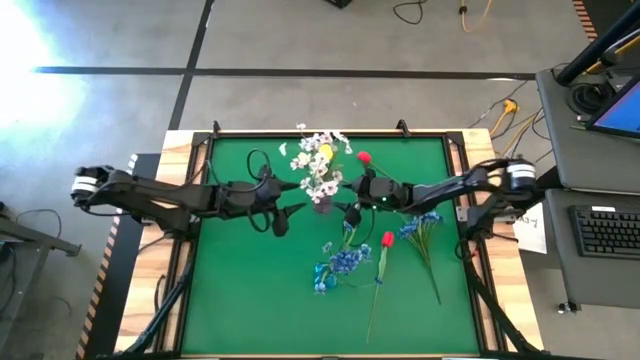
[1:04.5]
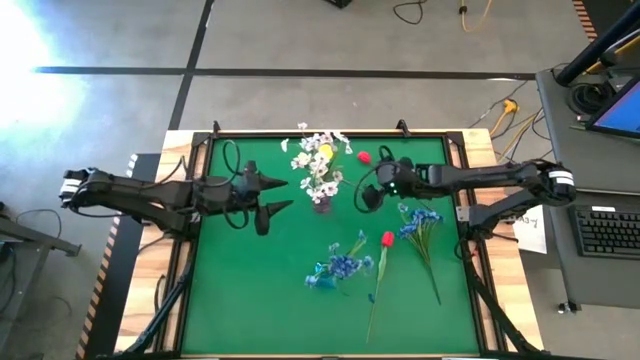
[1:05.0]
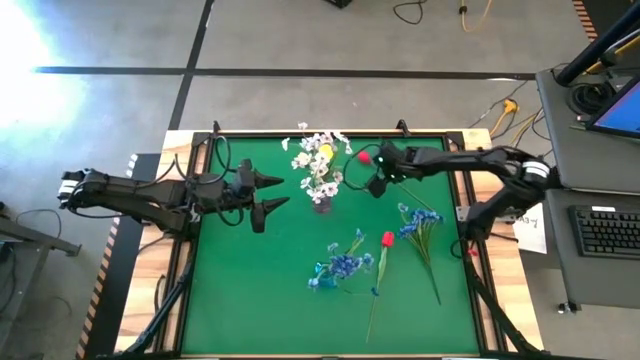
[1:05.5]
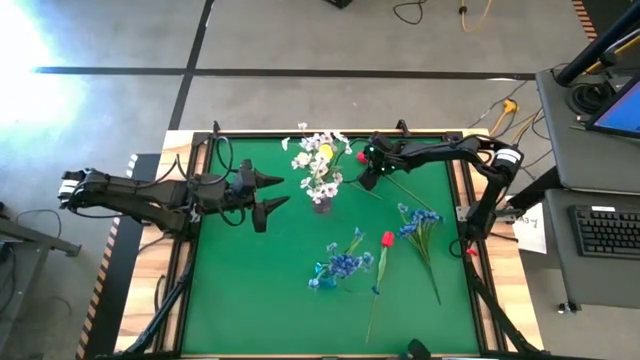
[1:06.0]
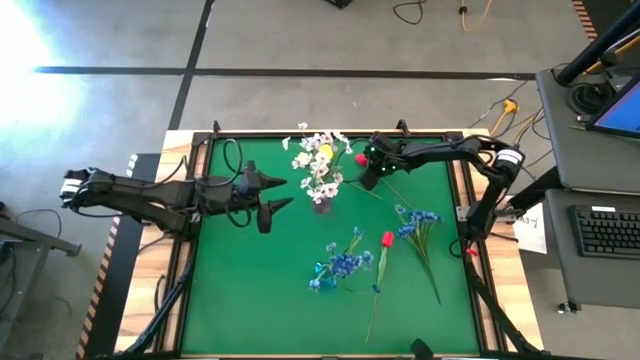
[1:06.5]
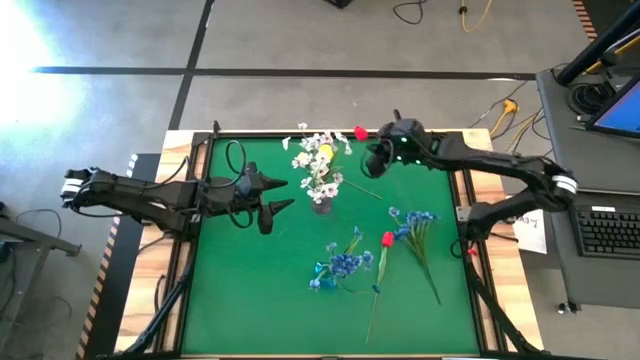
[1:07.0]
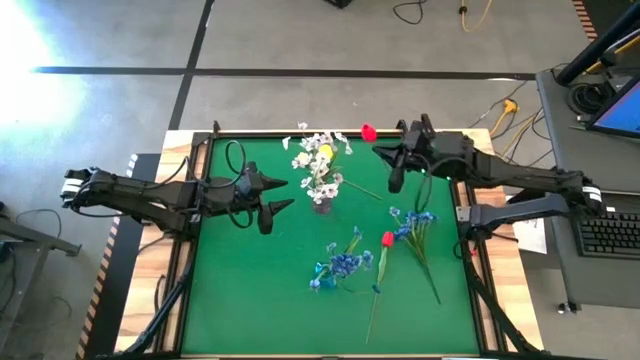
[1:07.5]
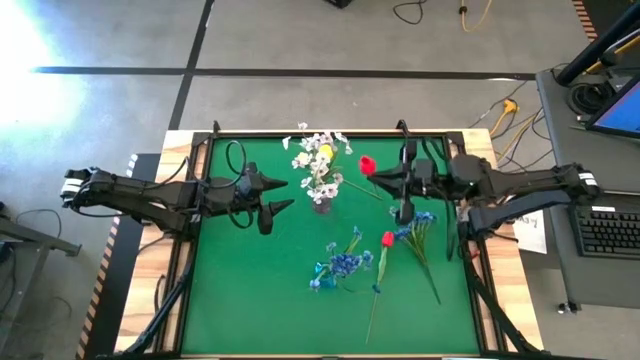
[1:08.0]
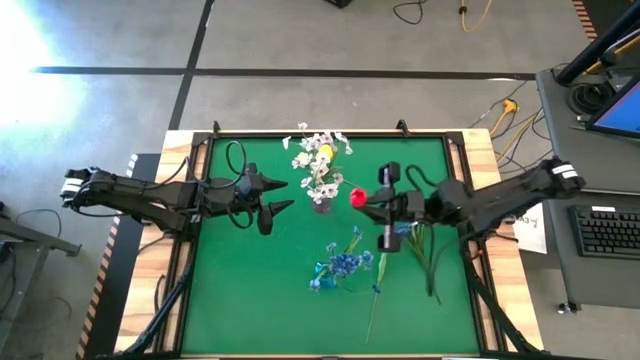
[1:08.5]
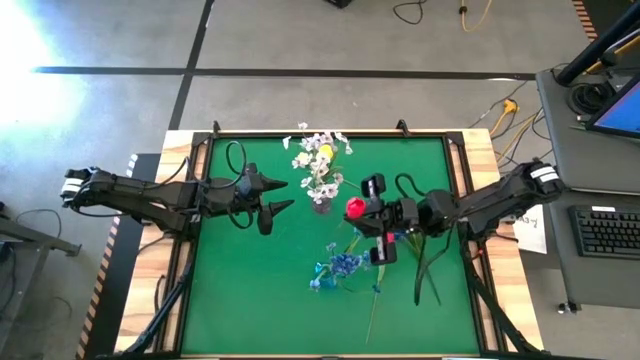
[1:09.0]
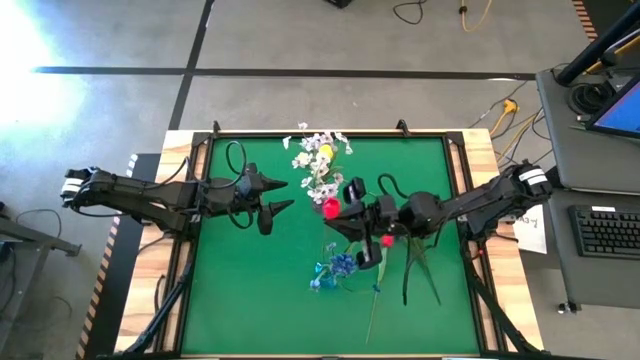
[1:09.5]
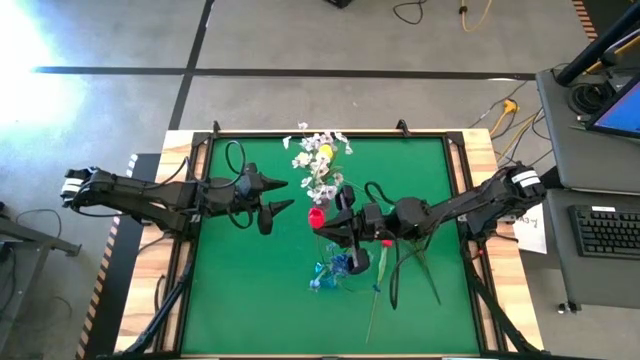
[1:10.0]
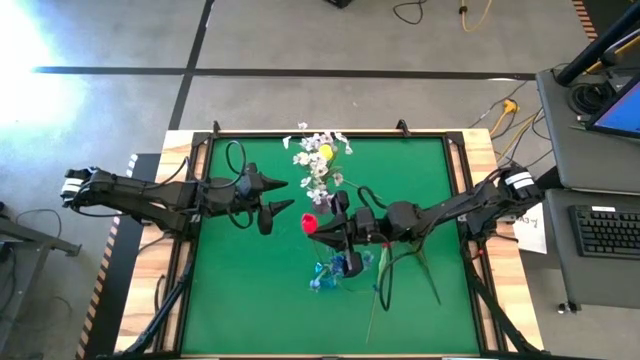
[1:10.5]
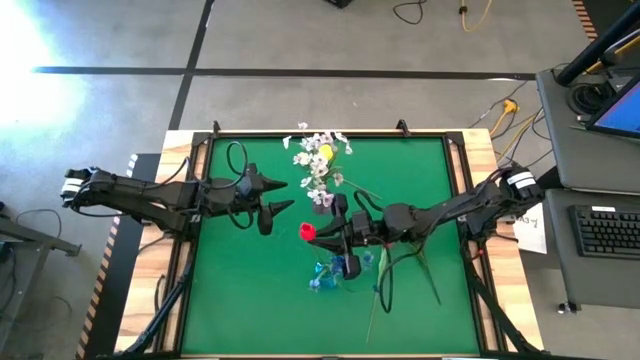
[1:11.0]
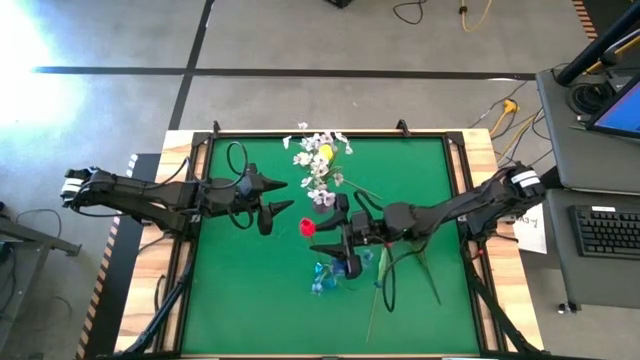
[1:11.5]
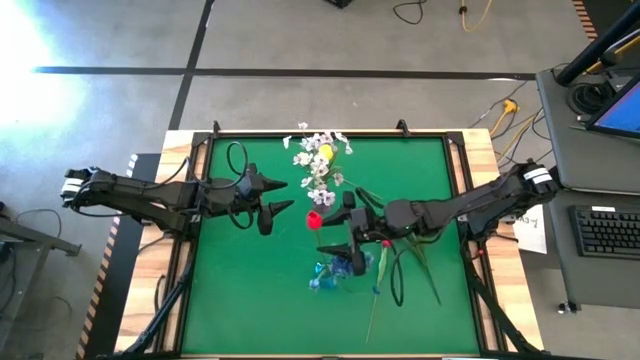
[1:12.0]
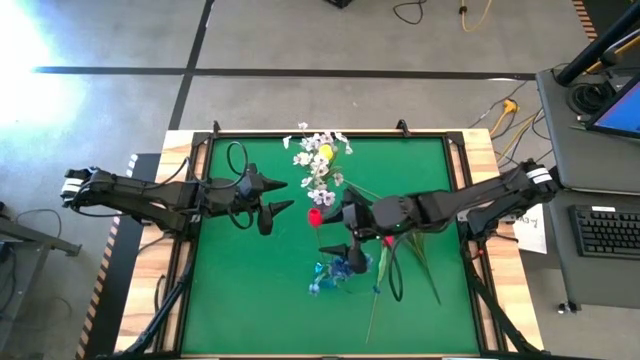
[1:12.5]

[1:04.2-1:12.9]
Task: Sort flowers into vase by color
Put the top red flower into the blue vase

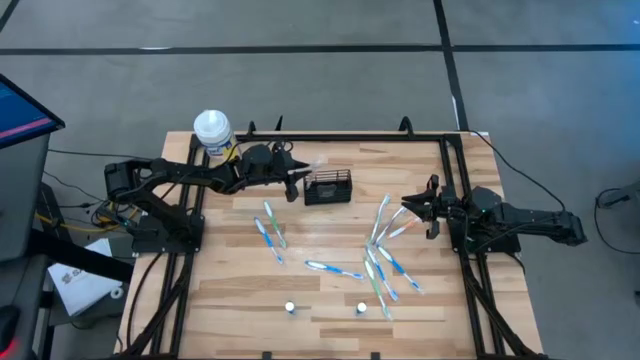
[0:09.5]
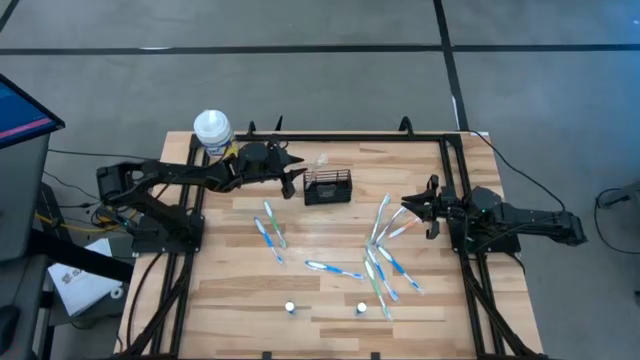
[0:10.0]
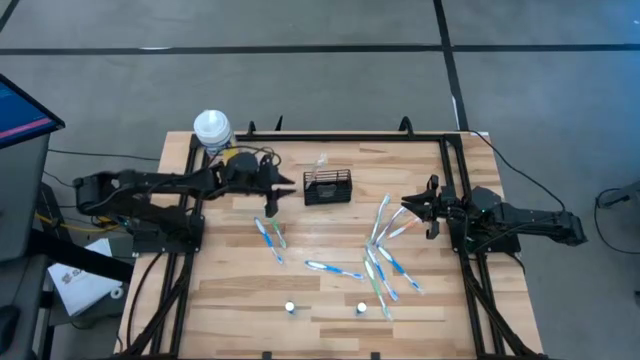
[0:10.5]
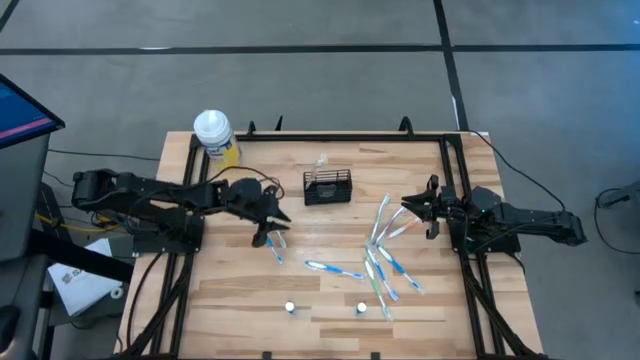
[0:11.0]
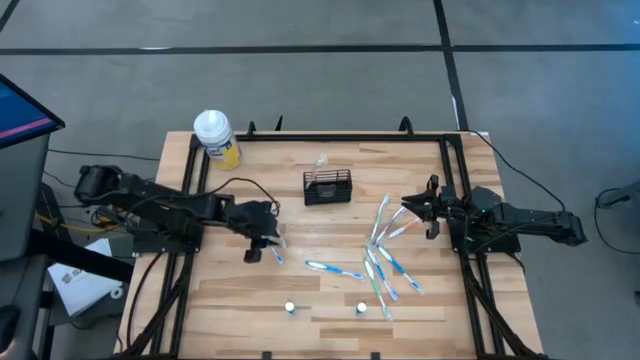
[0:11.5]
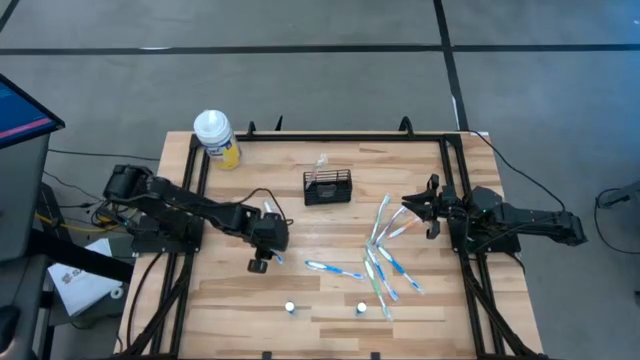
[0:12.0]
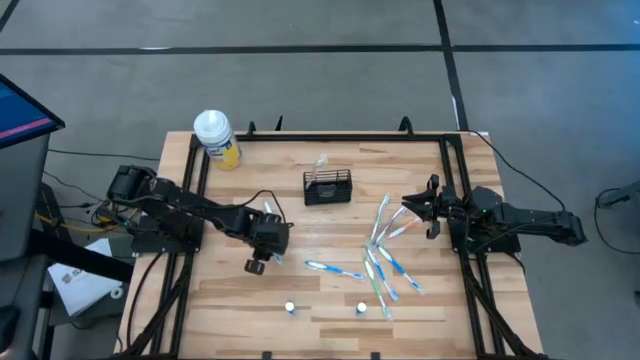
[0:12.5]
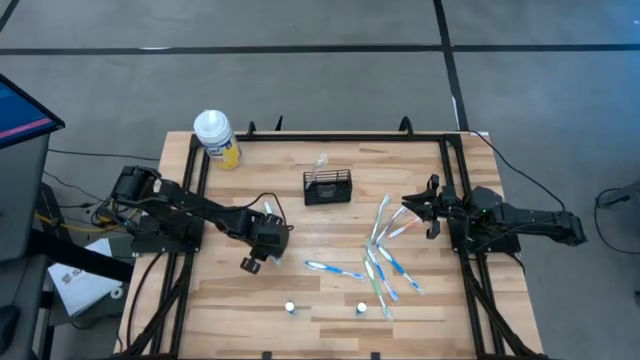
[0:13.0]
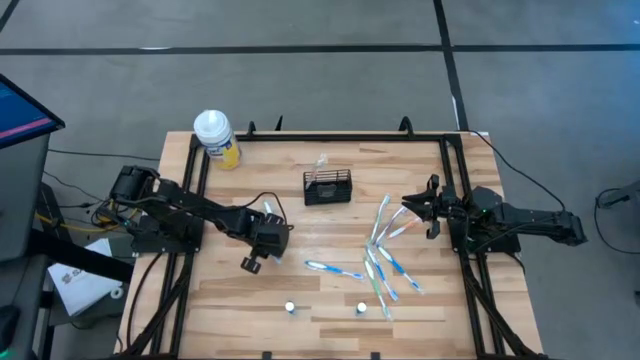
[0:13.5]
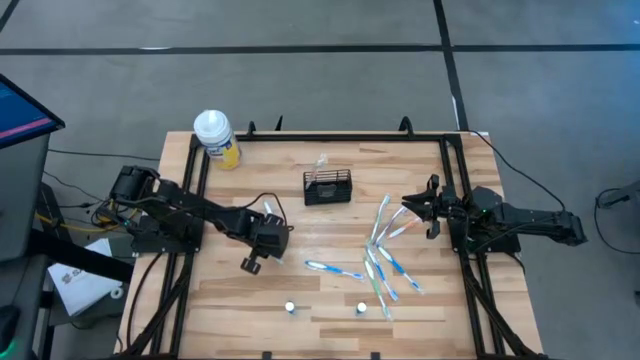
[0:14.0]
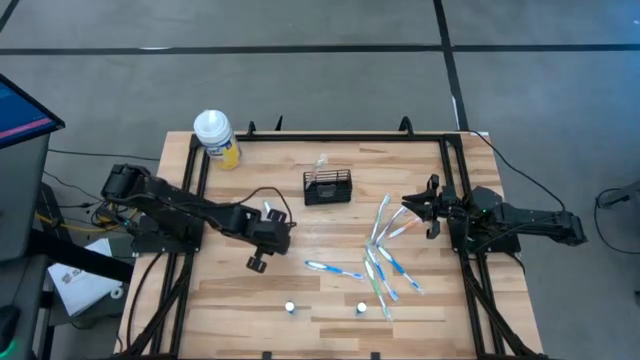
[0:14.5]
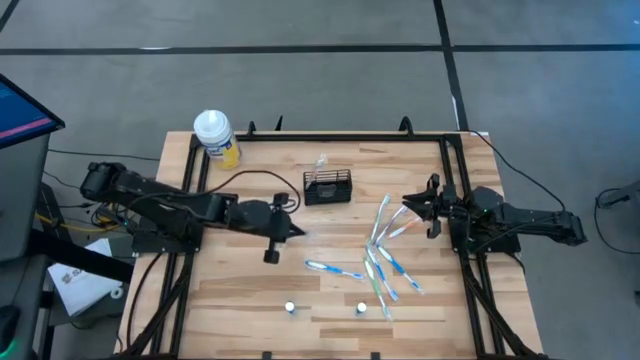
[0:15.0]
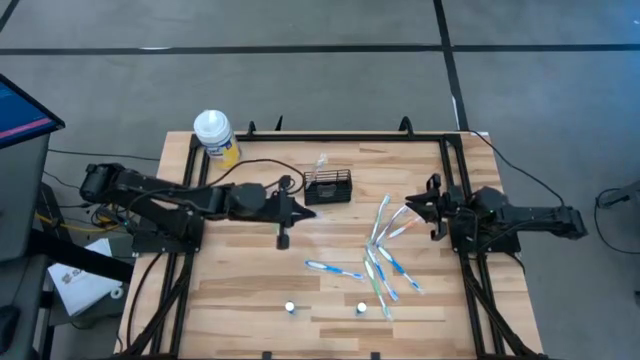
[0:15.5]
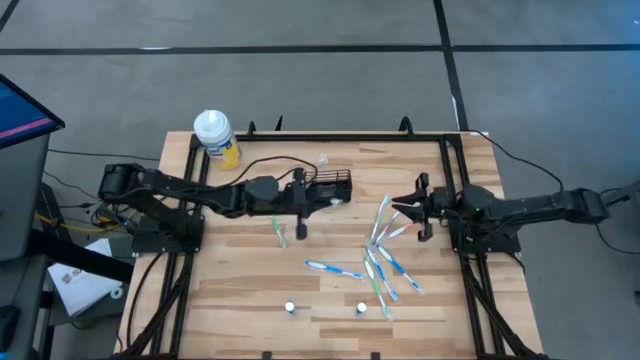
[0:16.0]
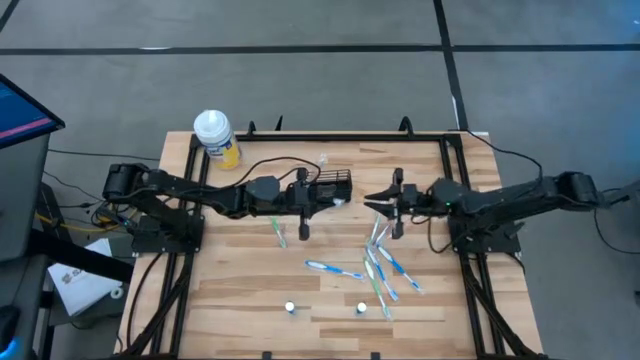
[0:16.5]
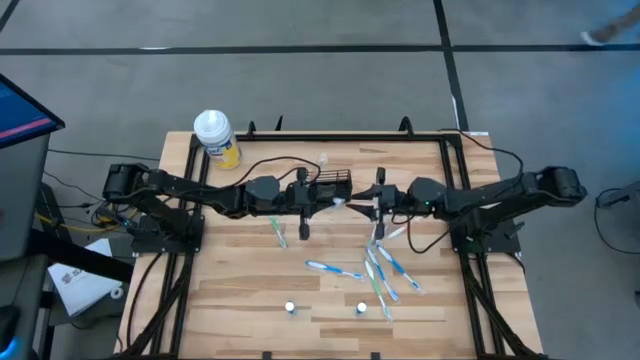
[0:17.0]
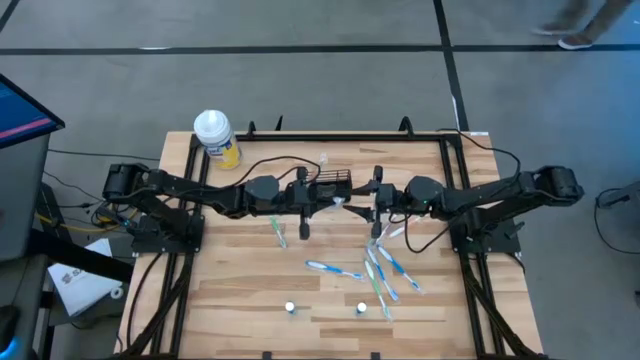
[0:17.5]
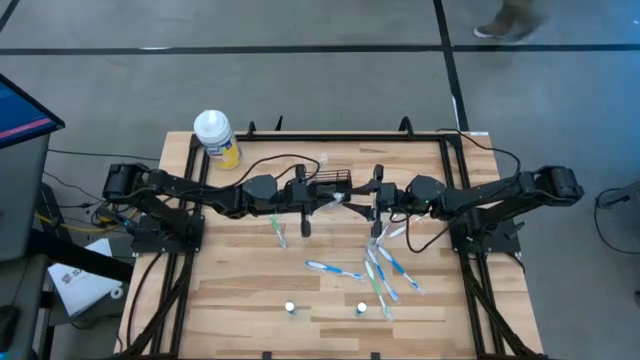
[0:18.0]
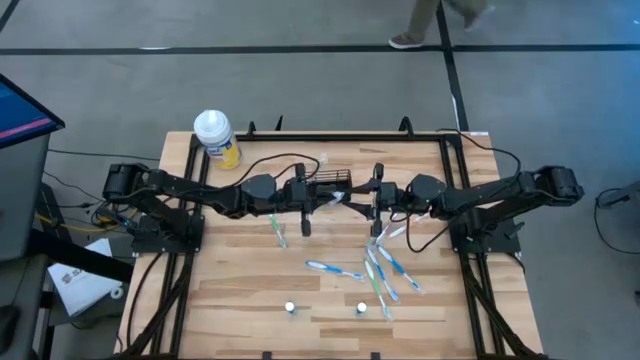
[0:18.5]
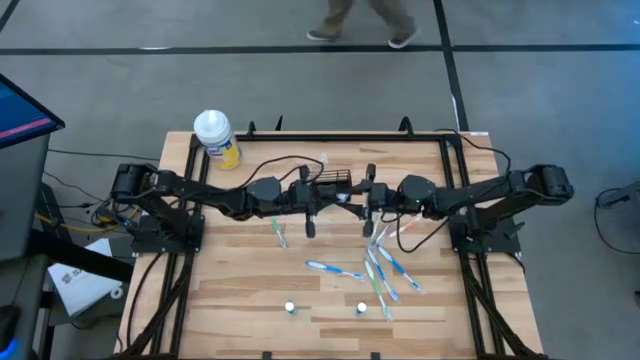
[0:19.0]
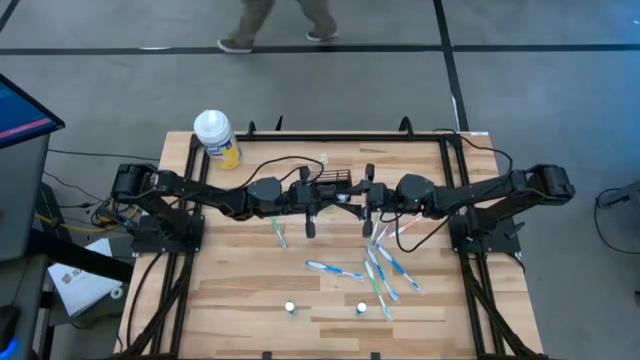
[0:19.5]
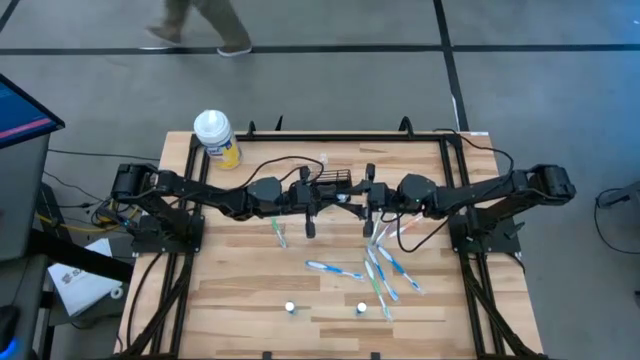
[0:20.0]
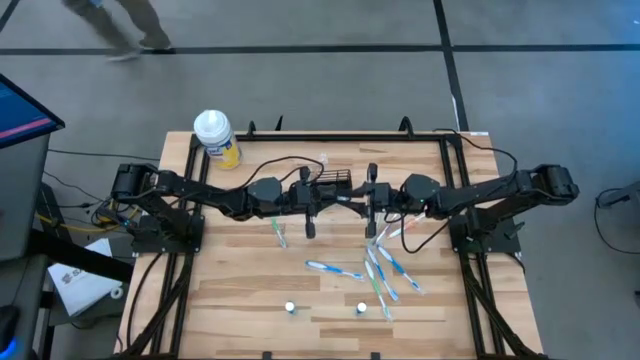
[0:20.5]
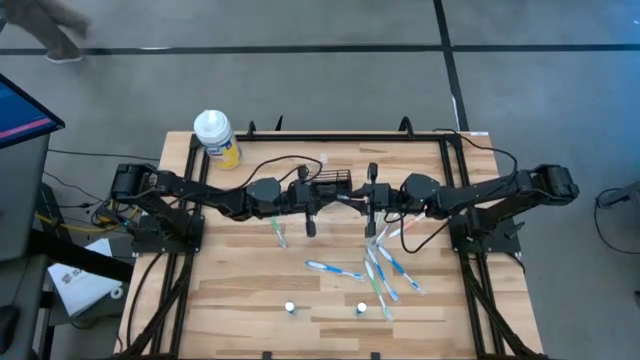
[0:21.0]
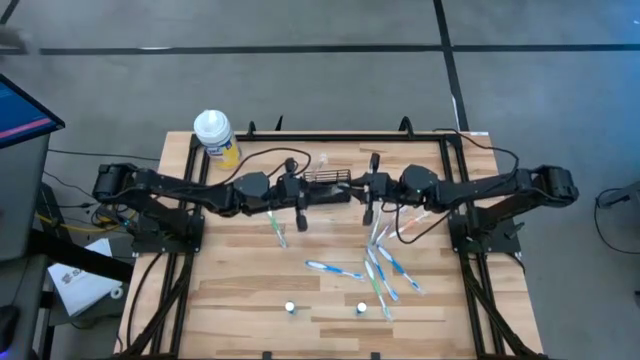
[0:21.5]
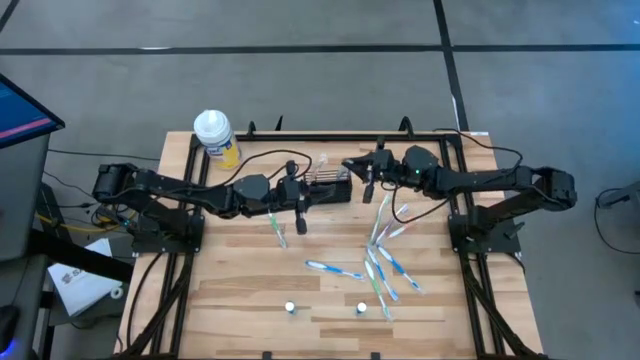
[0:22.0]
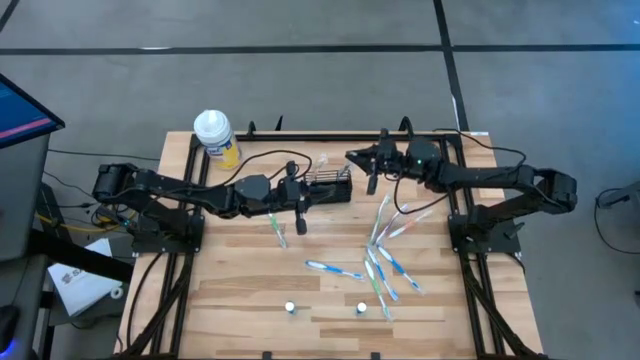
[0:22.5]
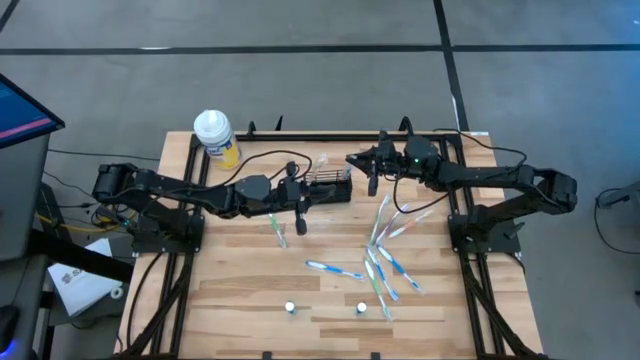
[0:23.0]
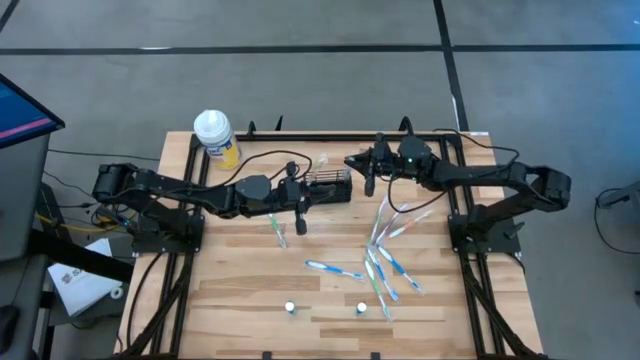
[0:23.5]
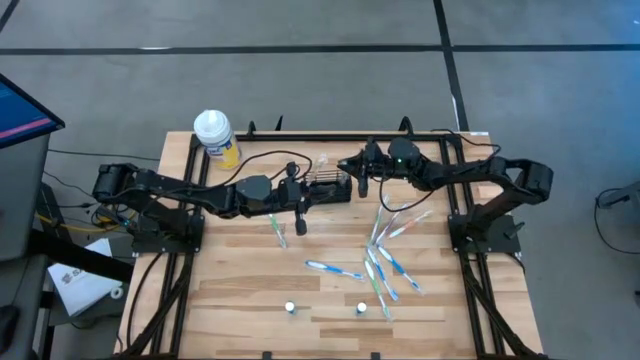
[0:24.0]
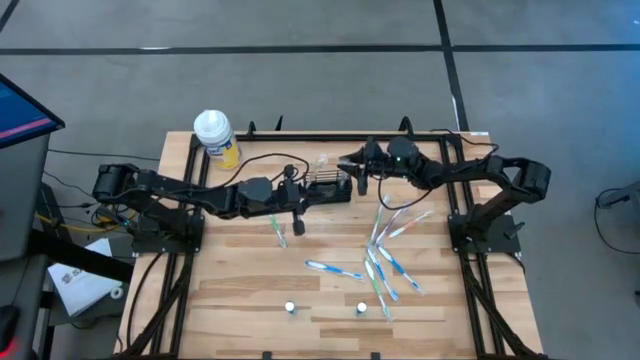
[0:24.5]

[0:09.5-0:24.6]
Task: Pick & Place toothbrushing station
Put the blue toothbrush into the black mesh organizer
